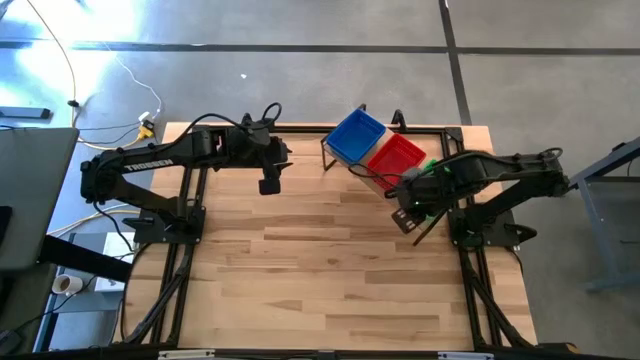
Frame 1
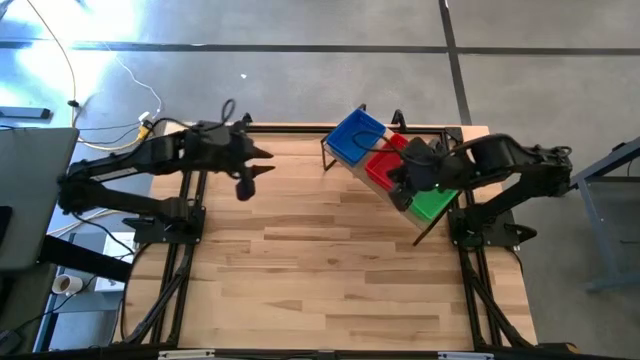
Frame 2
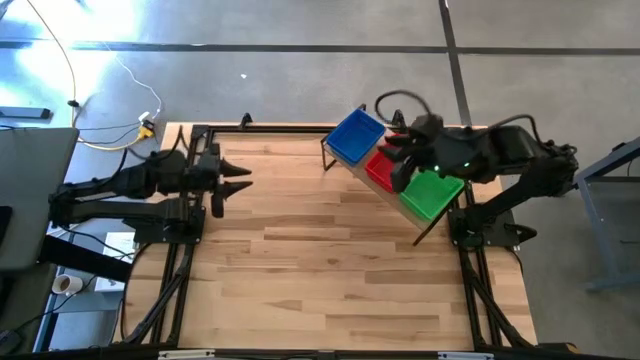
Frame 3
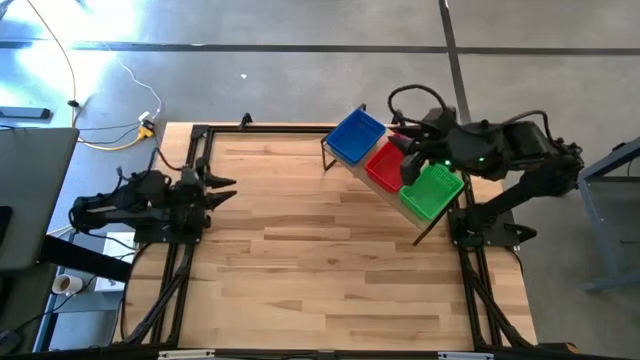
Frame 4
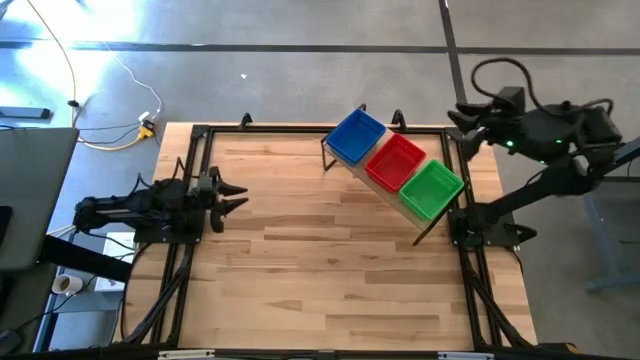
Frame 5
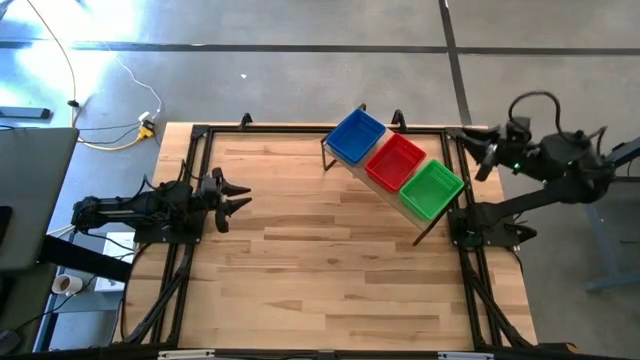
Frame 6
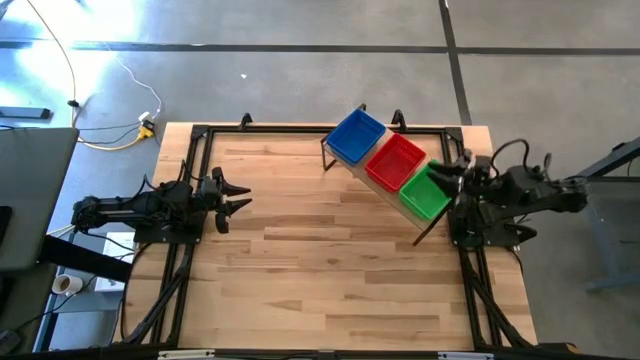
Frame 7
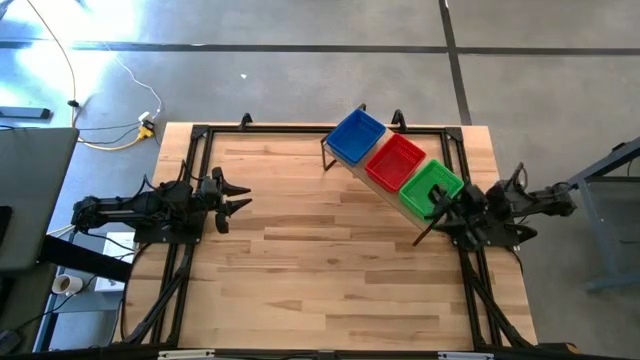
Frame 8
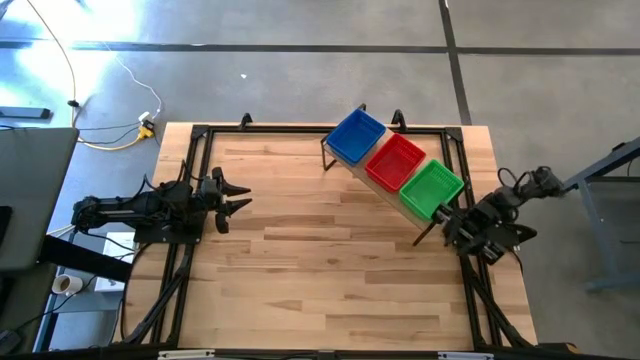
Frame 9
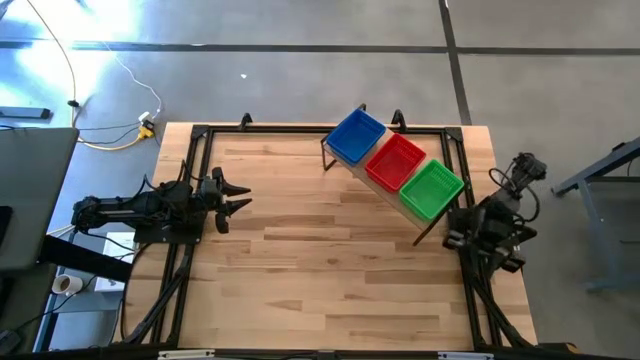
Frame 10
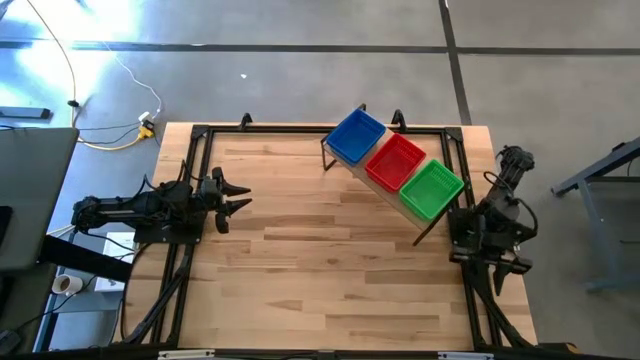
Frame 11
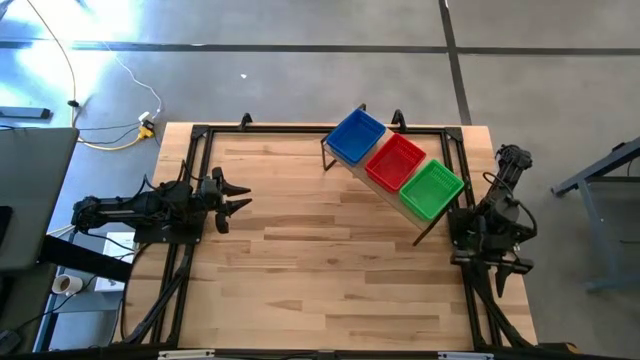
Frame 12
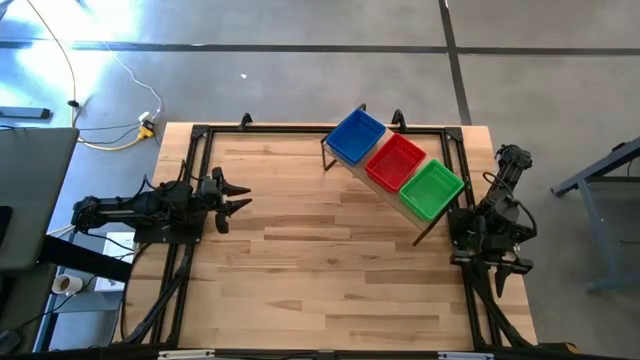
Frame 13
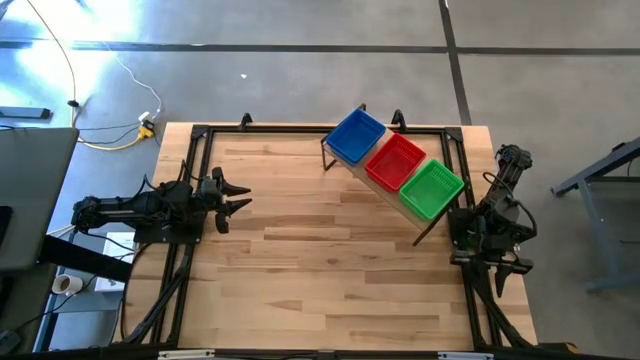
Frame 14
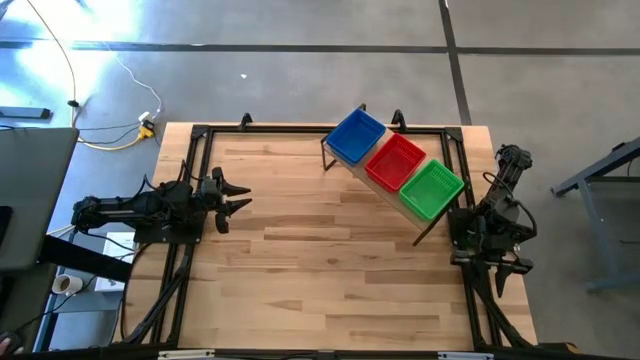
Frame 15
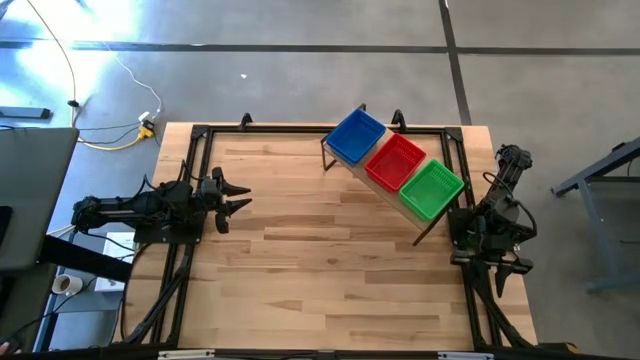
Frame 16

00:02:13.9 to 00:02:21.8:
Task: Stack baskets on shelf by color
Return to Home Position

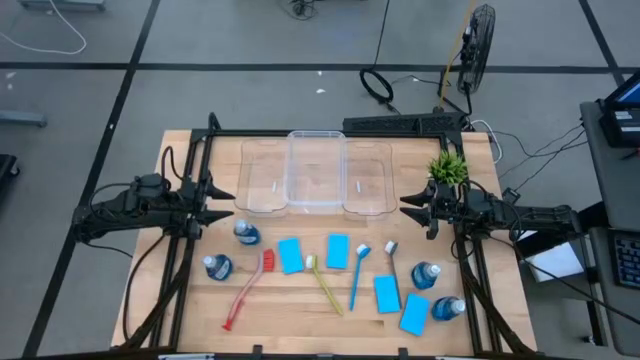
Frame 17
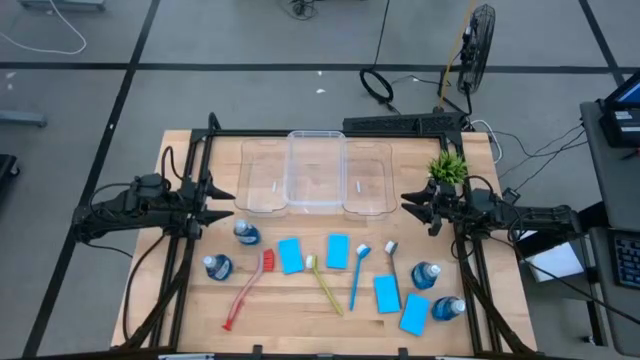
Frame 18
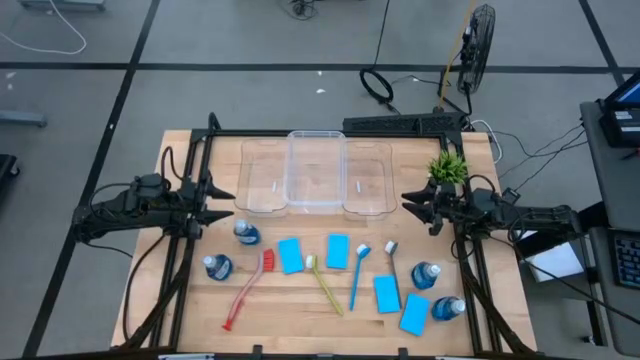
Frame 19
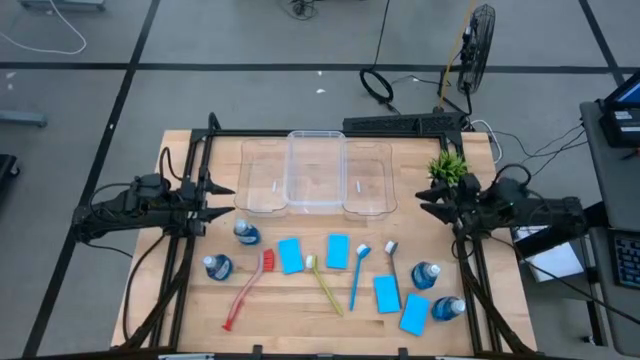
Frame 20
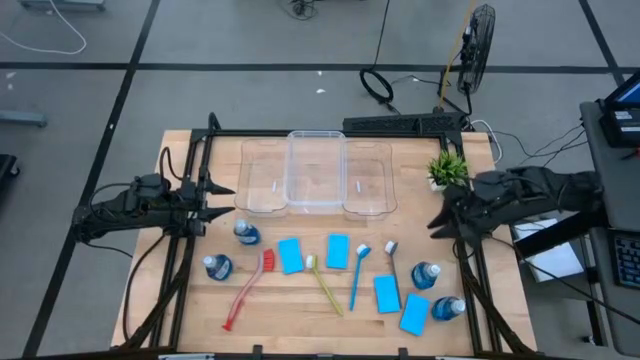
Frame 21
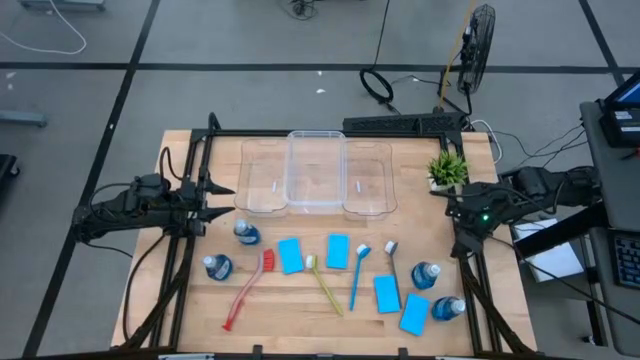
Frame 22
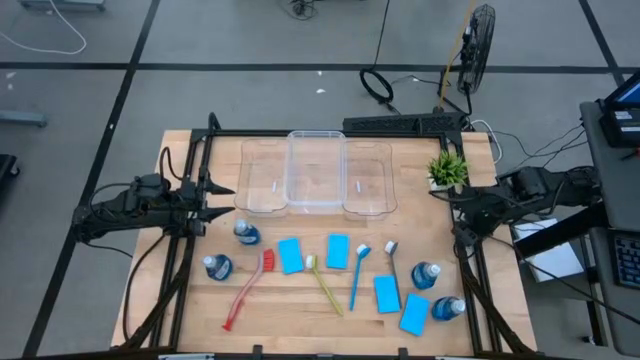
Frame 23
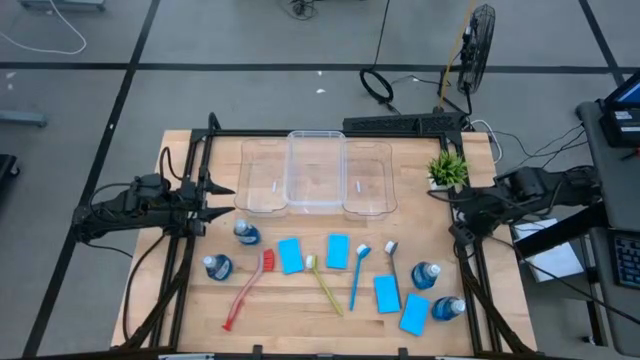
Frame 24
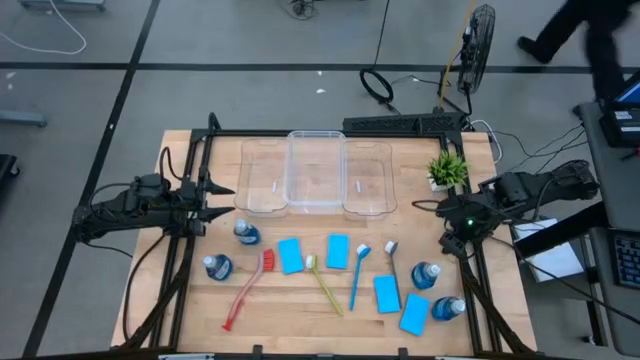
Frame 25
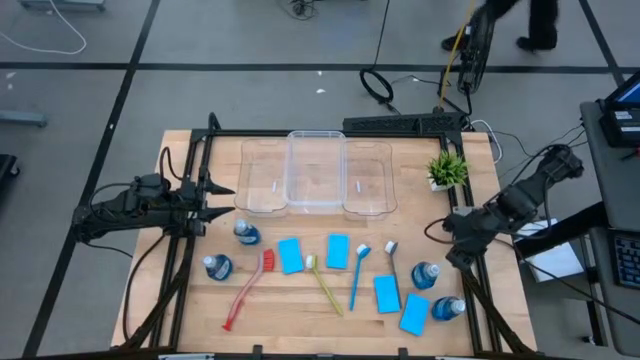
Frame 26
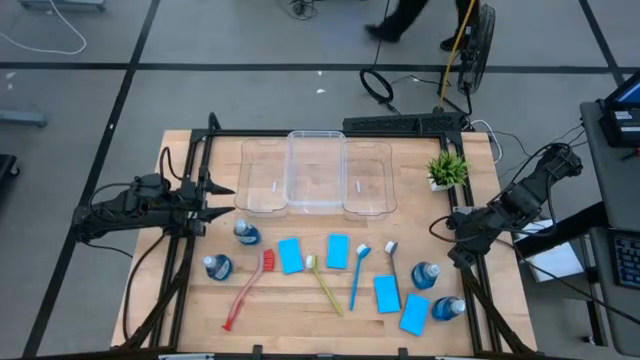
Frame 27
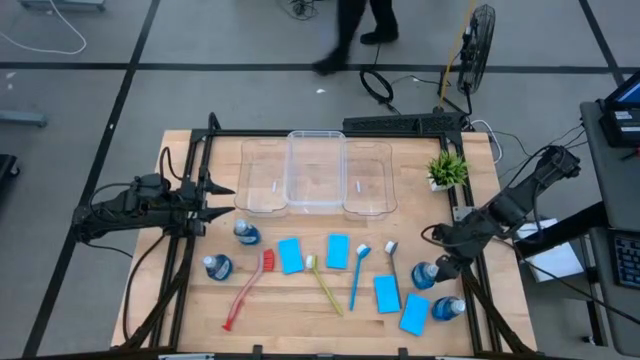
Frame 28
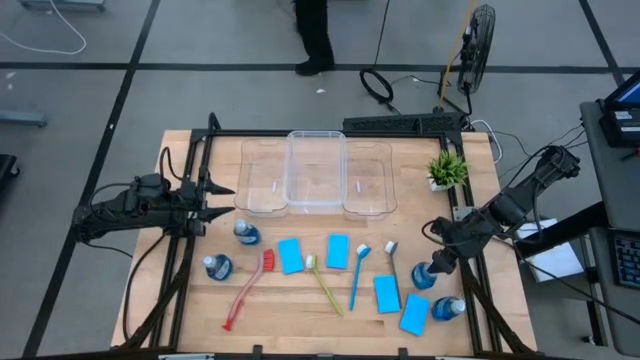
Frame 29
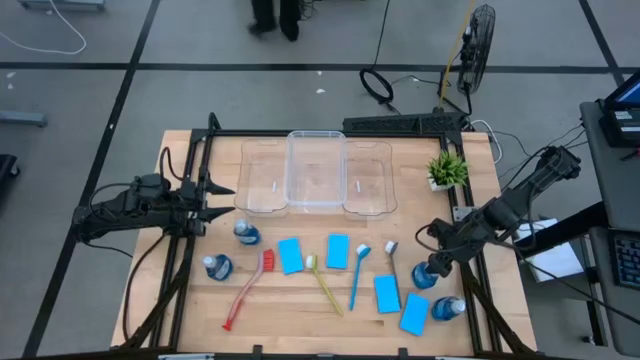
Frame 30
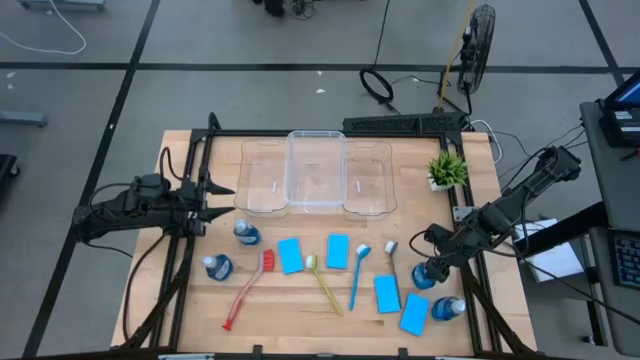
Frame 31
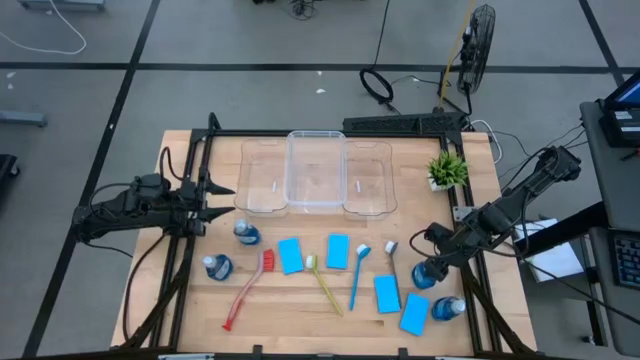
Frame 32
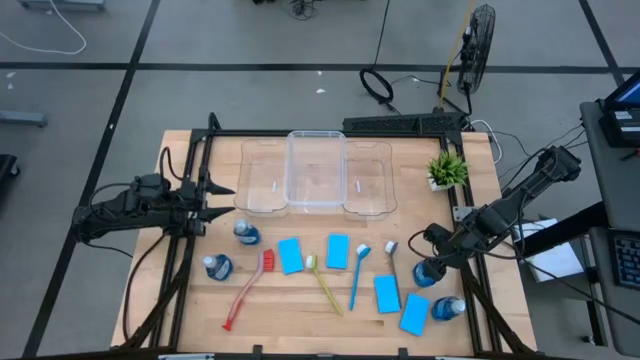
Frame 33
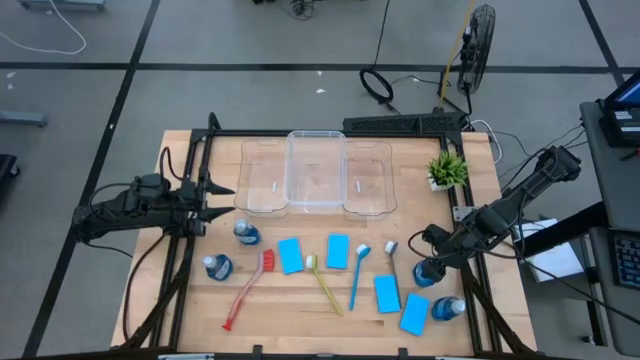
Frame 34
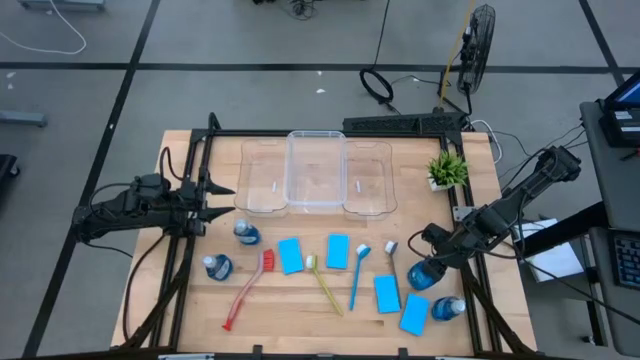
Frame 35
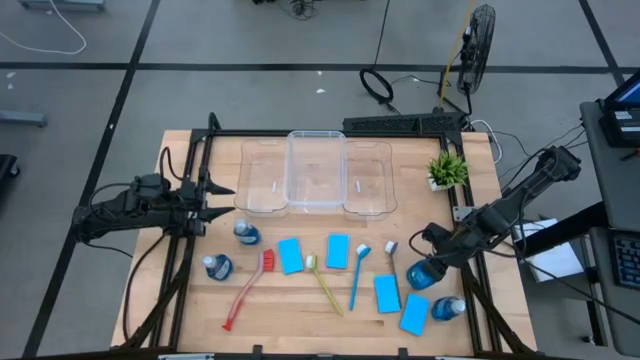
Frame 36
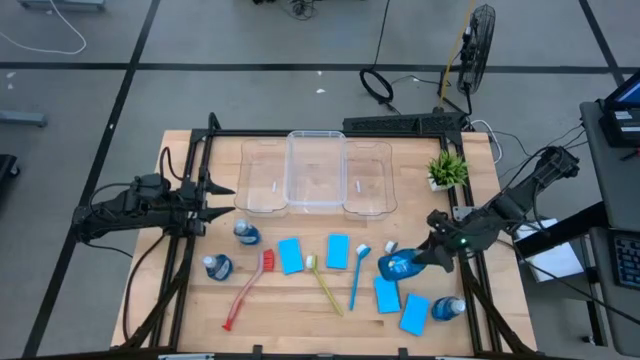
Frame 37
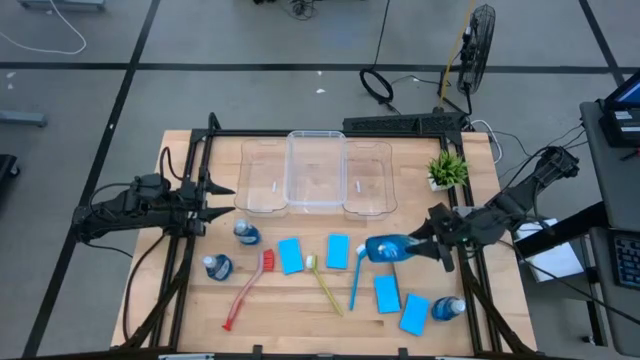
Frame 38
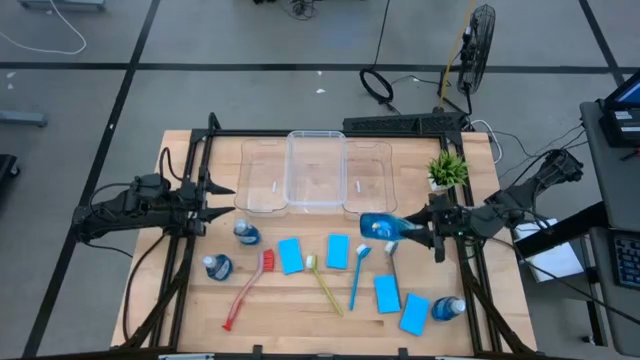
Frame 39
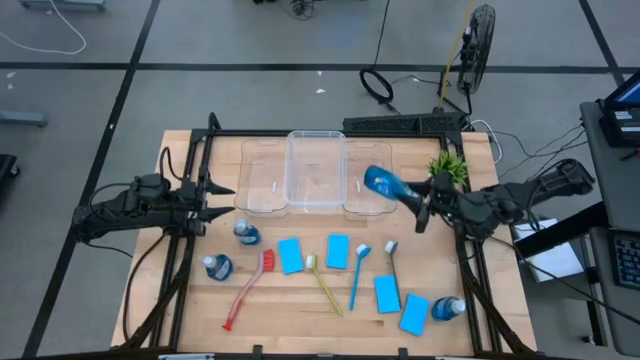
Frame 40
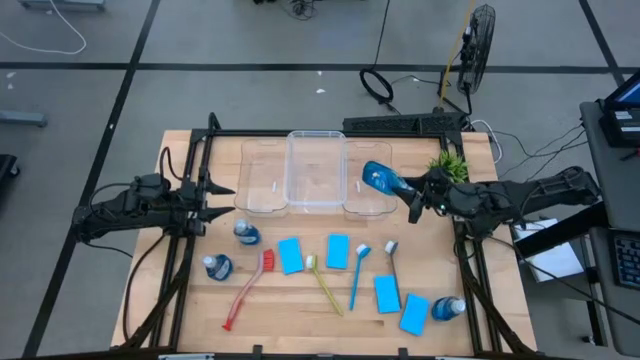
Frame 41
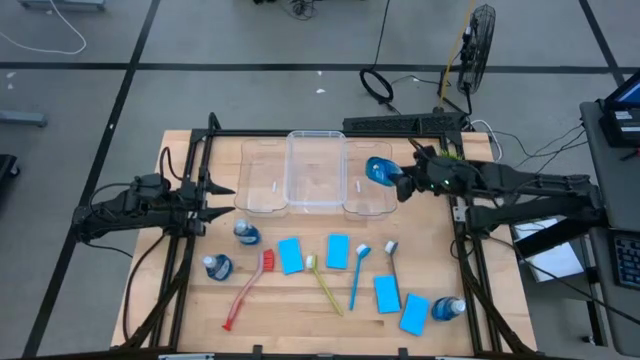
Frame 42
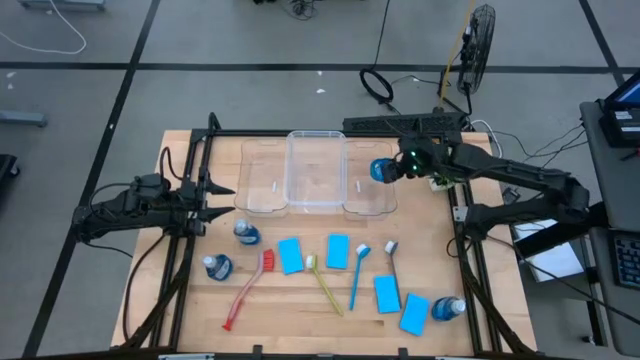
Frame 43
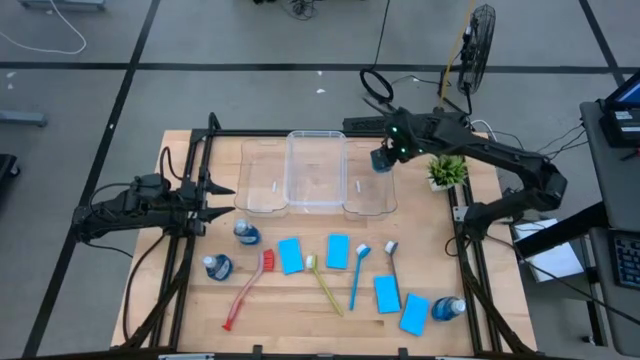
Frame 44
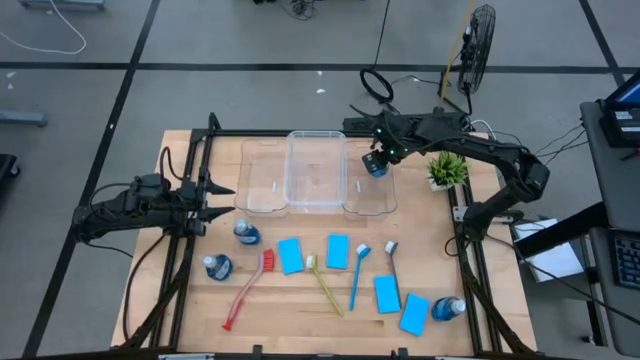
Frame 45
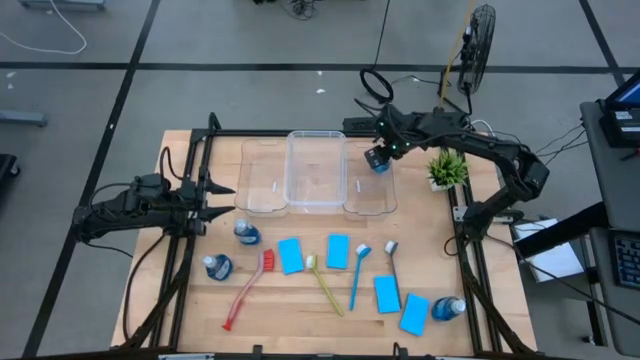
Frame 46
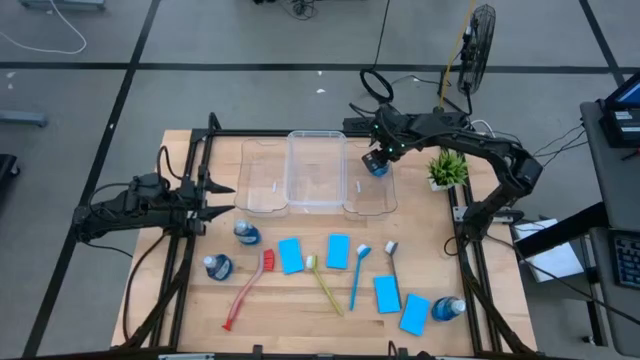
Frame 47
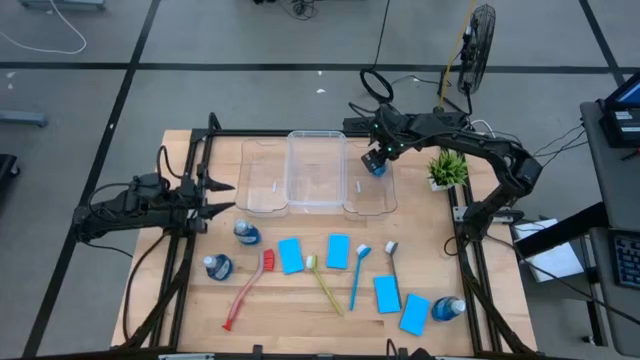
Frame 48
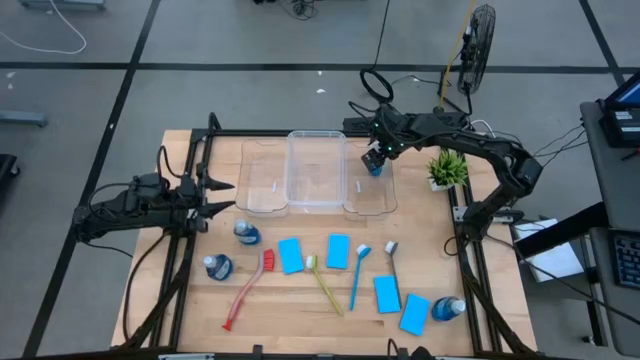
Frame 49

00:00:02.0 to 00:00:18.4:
Task: Pick & Place Kitchen Sink Supplies
Put the blue dishwashing liquid into the right transparent bin
